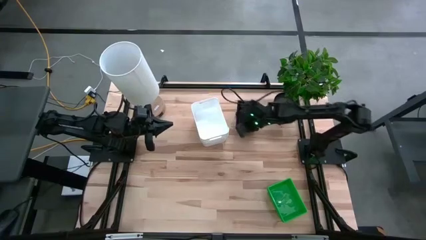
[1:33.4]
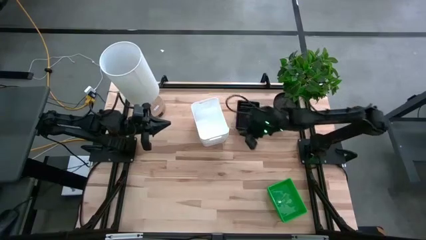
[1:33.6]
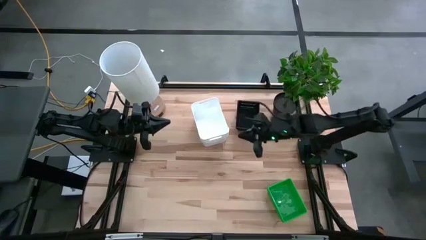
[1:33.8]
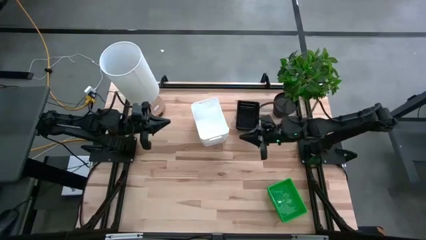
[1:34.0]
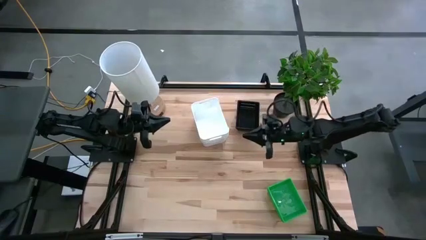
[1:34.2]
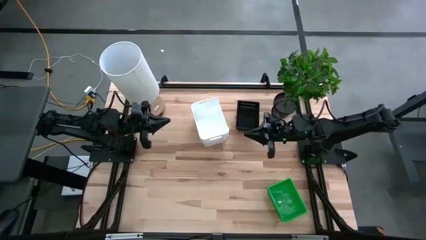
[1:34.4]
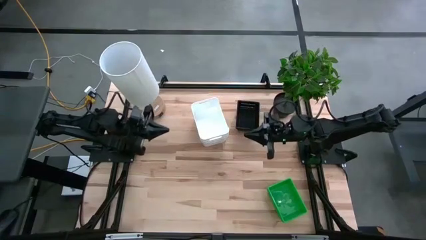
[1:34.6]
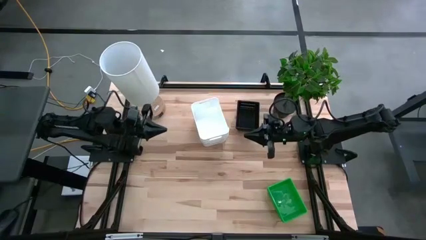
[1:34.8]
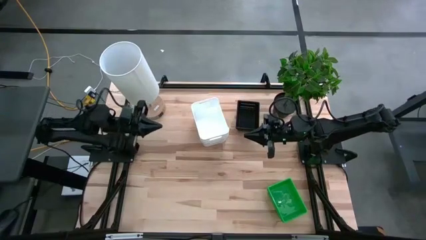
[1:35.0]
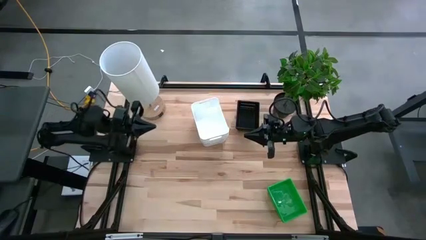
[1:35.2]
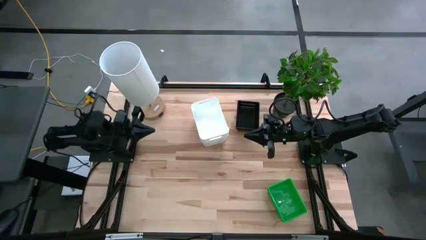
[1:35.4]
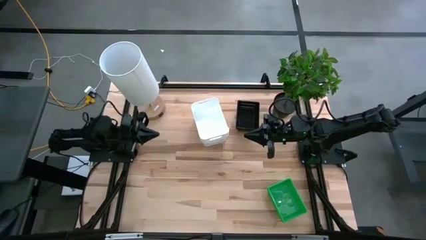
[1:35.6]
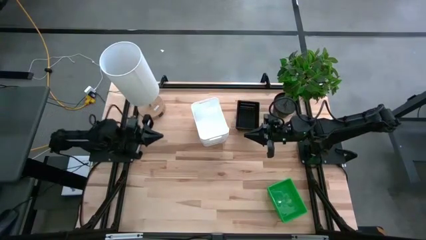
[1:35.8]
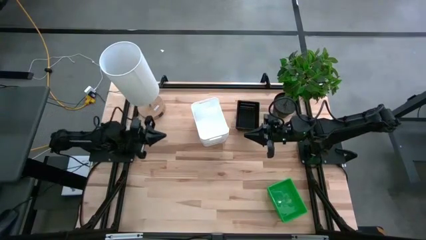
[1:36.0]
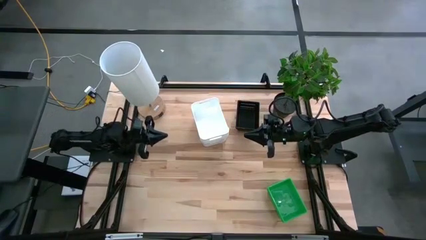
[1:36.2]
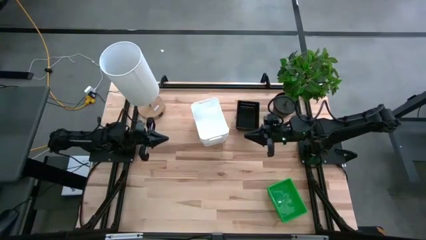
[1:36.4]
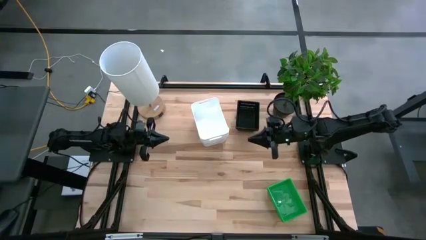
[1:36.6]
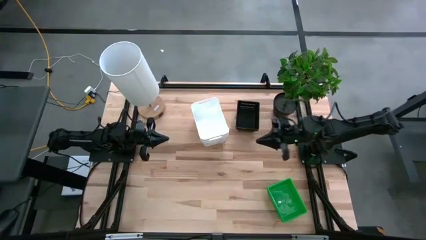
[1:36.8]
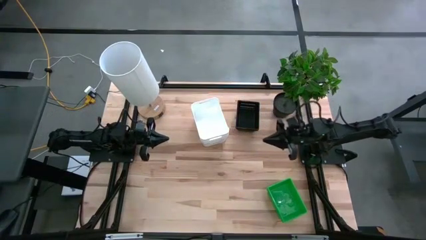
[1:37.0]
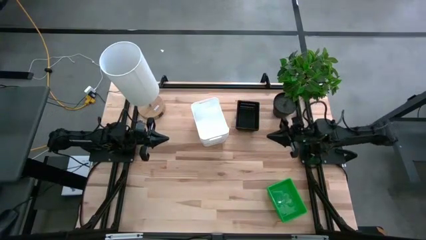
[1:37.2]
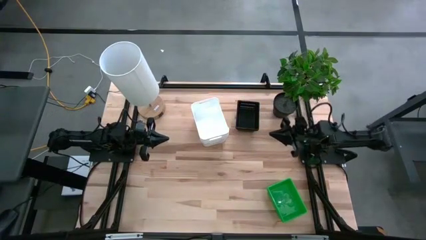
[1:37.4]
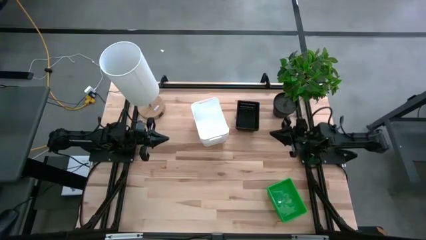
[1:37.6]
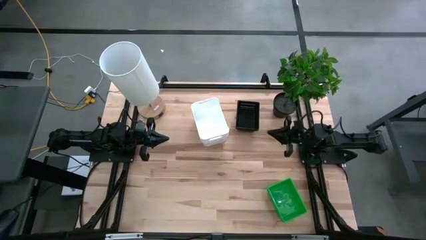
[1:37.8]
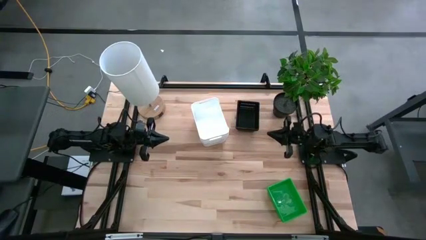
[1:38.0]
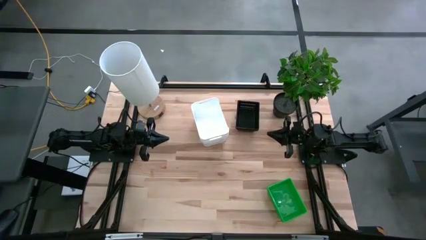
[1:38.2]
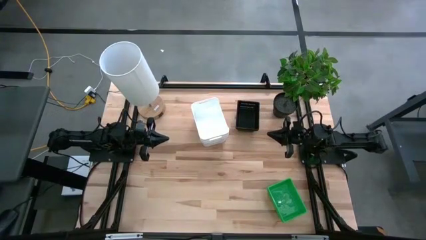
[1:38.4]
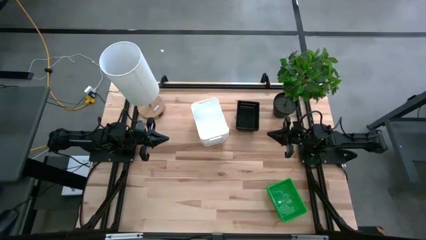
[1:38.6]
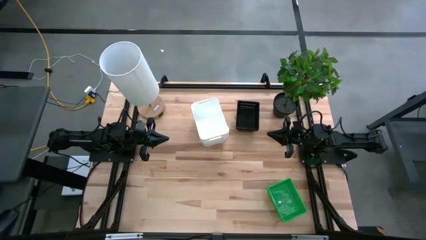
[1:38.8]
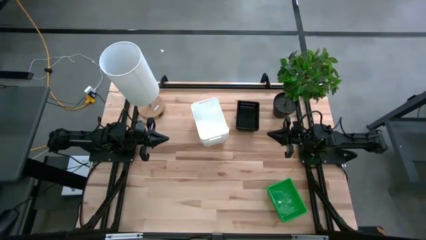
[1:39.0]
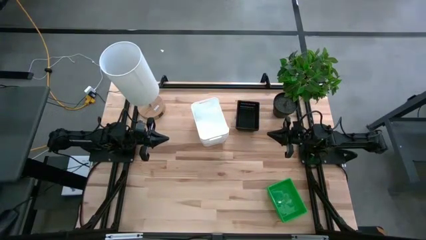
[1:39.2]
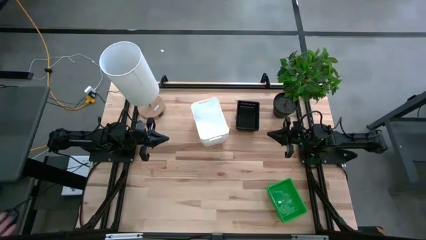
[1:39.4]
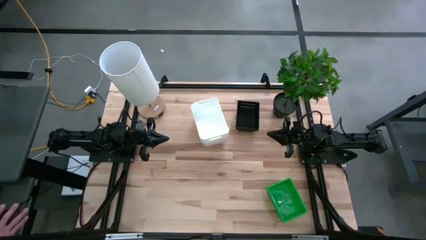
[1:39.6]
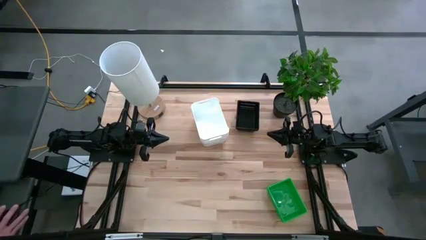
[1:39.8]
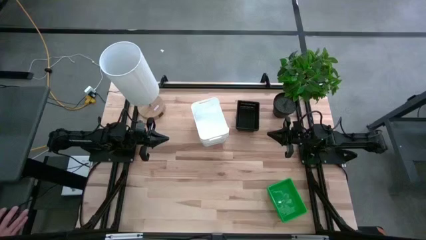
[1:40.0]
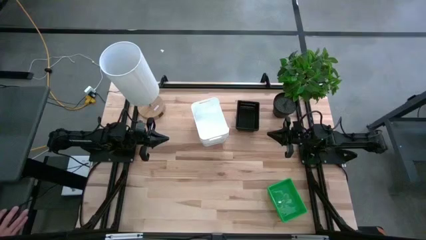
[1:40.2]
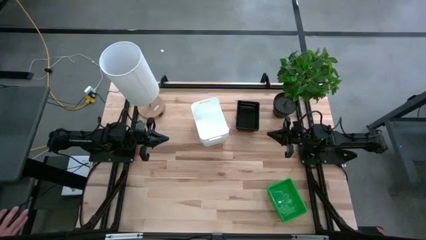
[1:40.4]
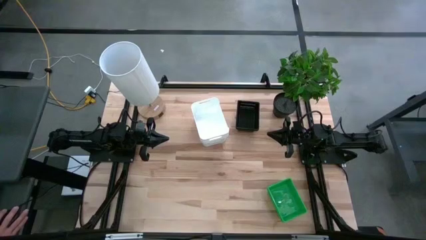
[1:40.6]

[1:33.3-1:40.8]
Return to Home Position

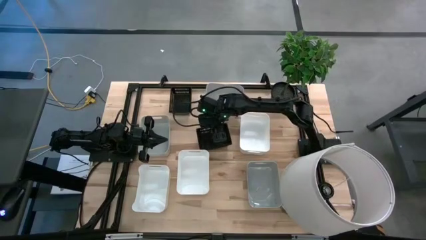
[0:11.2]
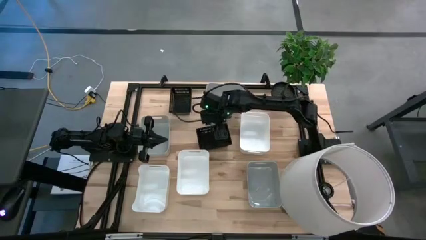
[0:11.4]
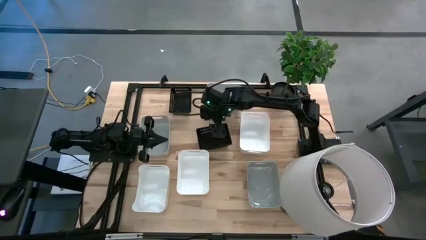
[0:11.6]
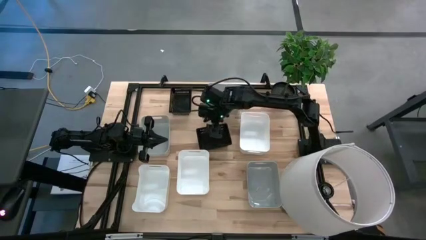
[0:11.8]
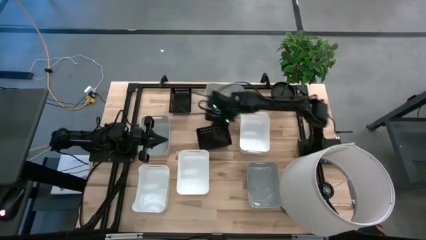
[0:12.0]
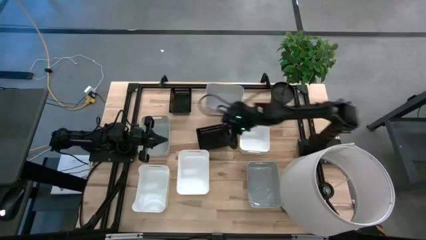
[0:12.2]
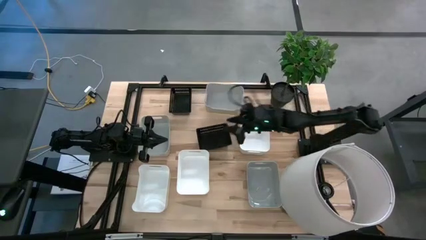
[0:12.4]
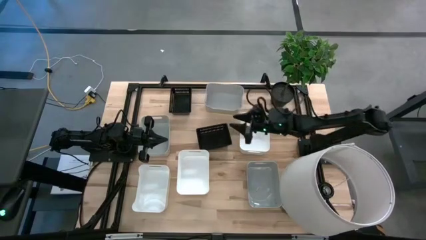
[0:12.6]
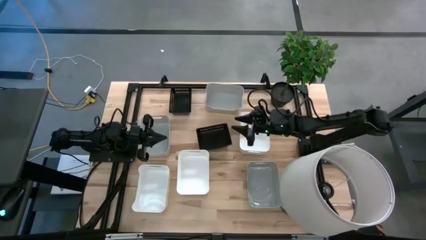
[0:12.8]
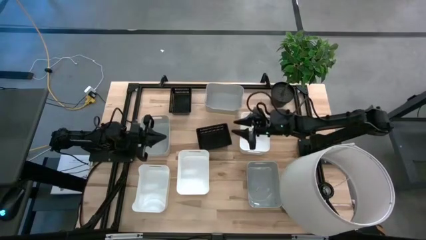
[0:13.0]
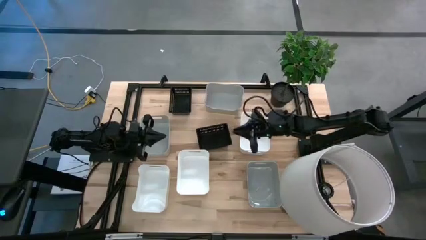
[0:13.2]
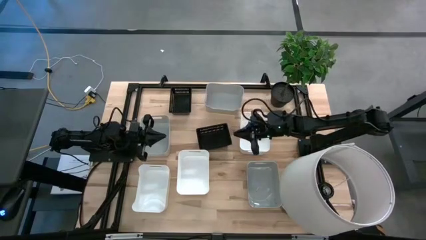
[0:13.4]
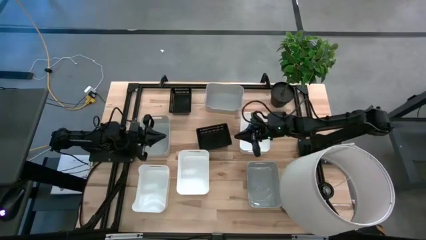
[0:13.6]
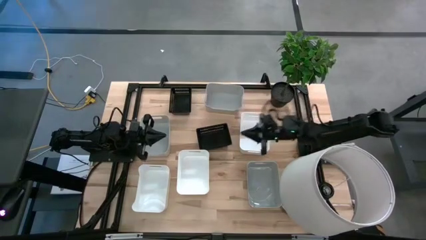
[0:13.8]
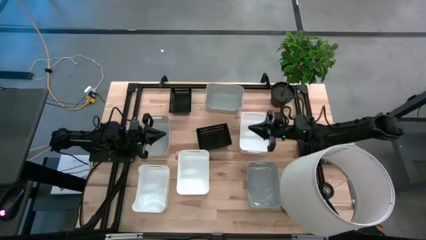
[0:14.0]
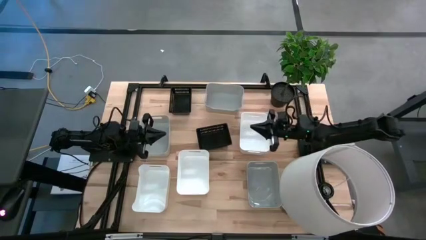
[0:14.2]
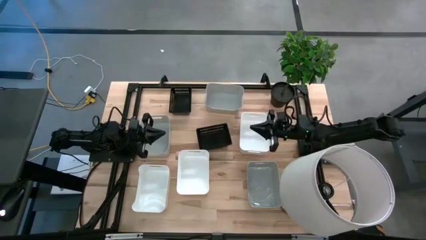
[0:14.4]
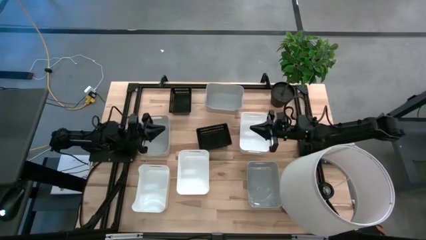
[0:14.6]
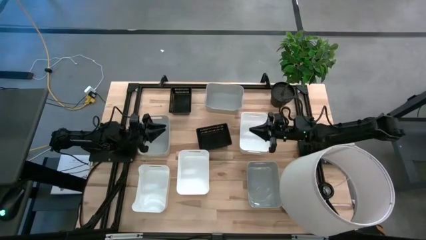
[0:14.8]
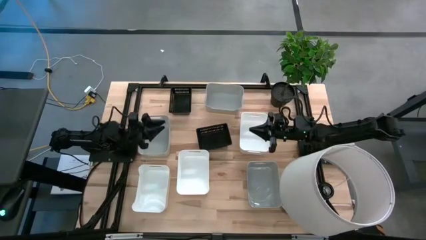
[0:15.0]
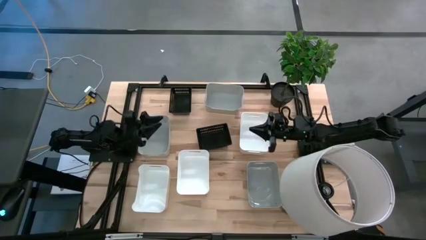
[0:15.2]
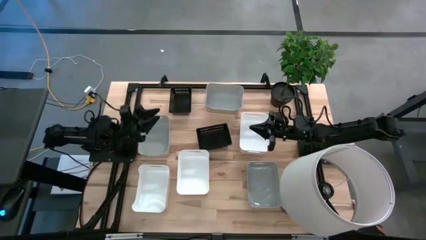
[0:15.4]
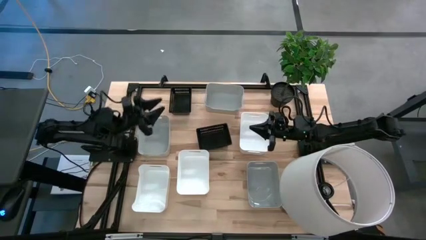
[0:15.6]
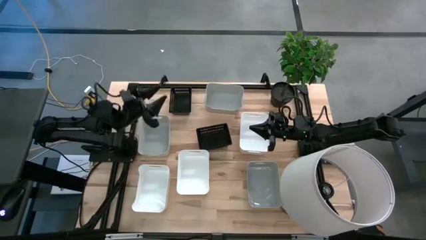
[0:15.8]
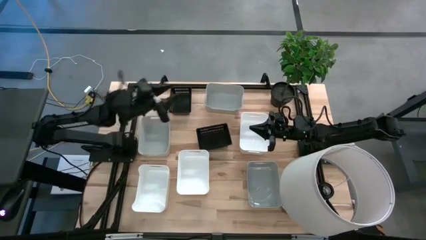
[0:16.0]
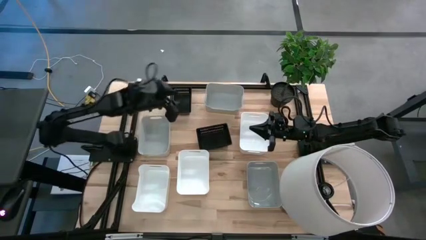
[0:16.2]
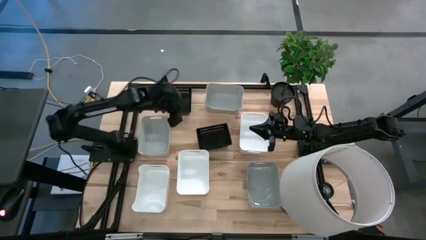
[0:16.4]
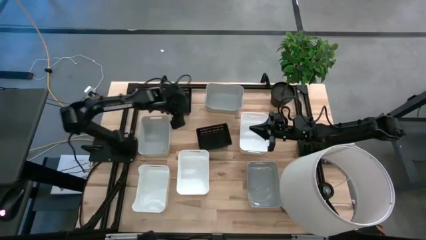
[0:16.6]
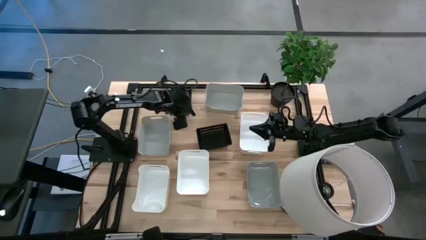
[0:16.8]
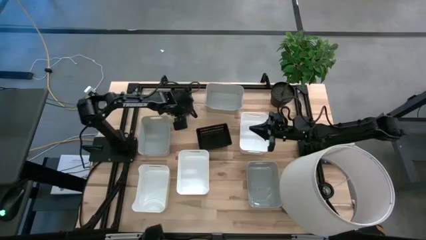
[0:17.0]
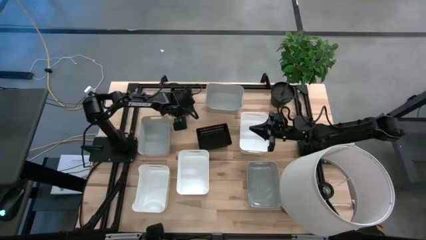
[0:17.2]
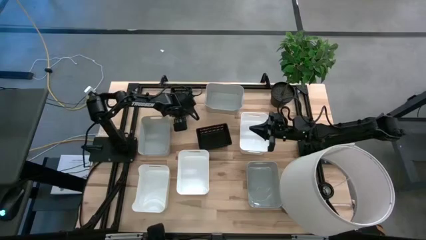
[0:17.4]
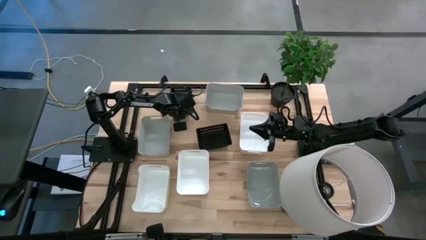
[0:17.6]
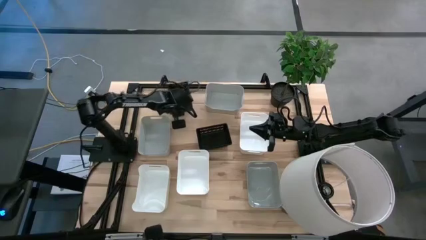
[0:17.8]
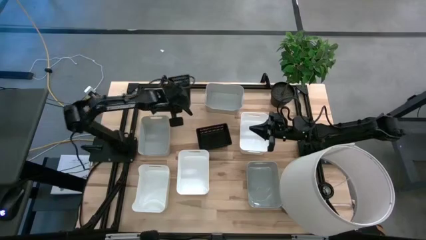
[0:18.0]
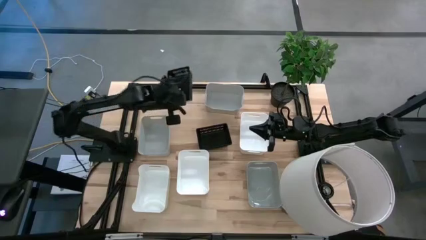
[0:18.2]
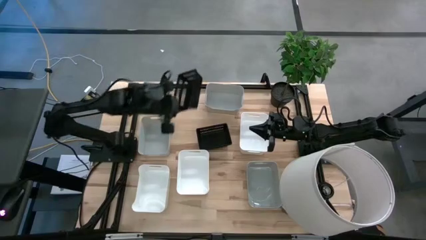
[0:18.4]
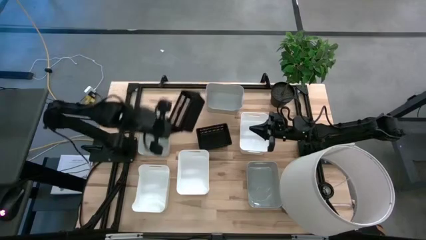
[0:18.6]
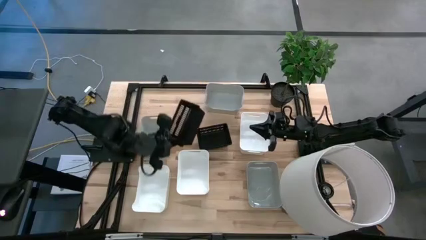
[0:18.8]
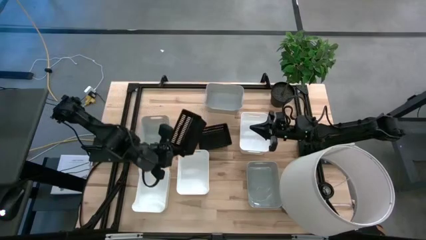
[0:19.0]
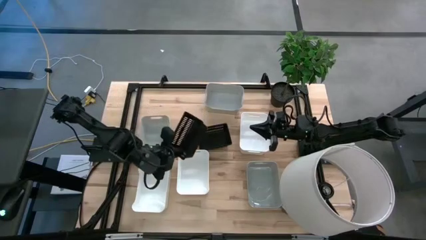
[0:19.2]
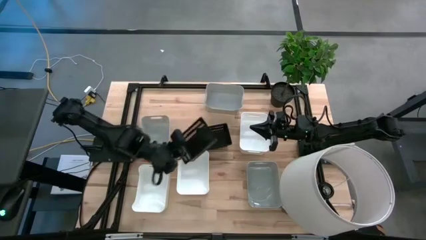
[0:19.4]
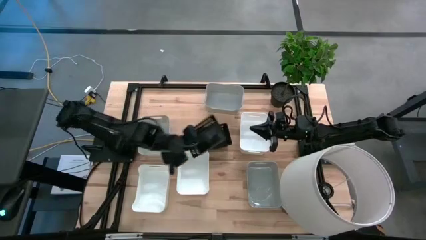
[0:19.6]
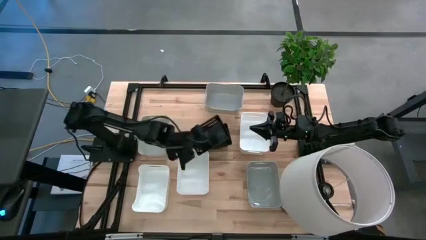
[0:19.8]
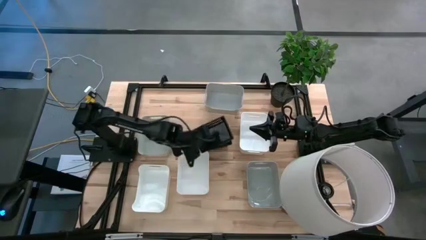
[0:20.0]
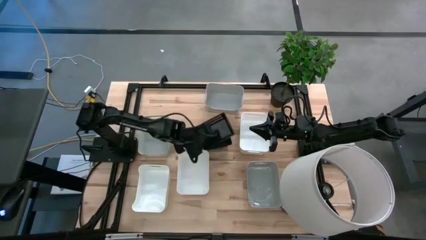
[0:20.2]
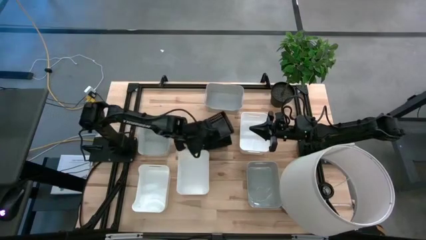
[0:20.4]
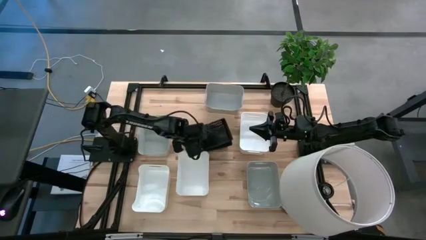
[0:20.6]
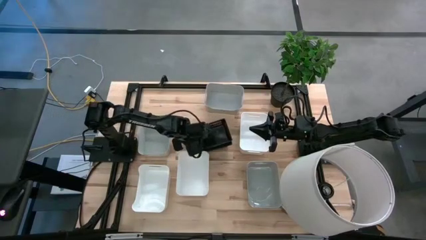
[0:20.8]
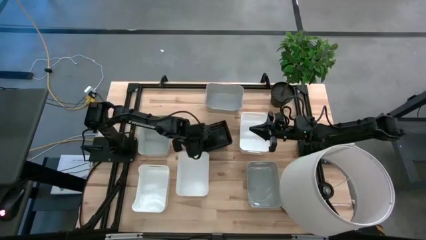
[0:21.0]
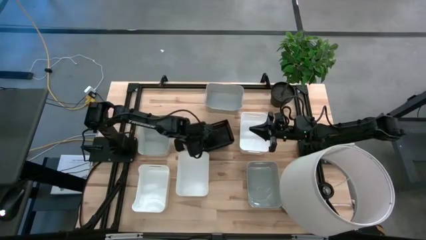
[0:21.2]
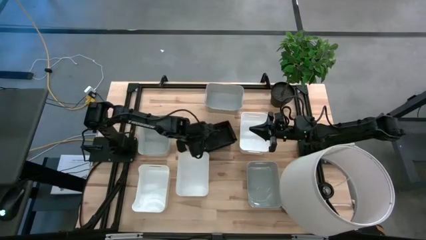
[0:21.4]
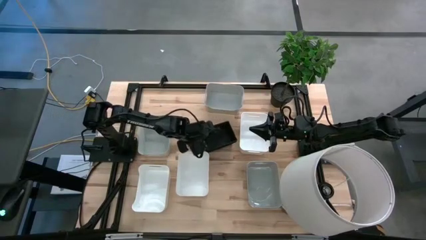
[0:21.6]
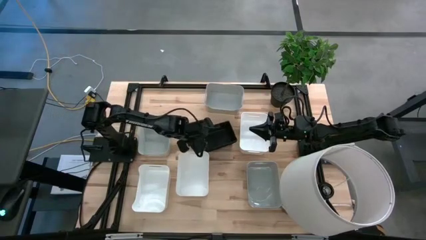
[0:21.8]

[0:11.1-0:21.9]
Stack the top black bin on top of the black bin
